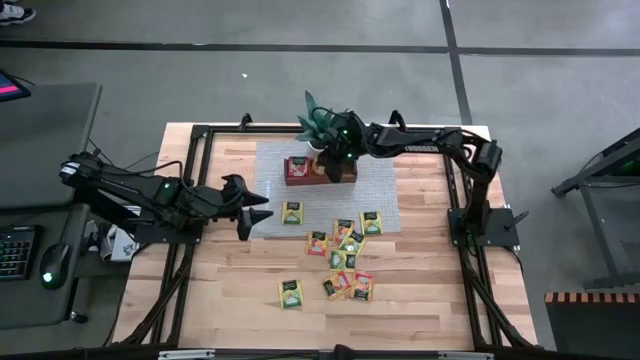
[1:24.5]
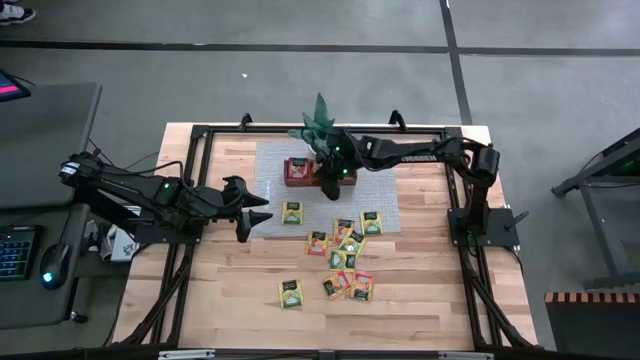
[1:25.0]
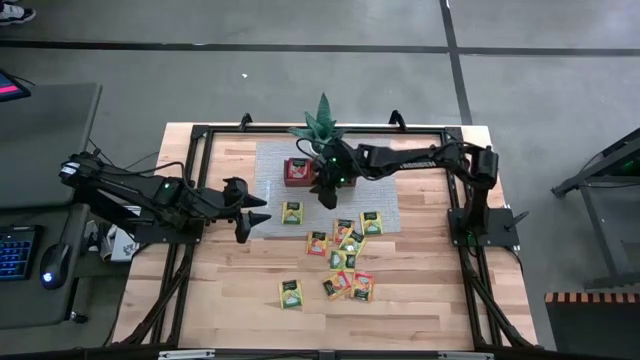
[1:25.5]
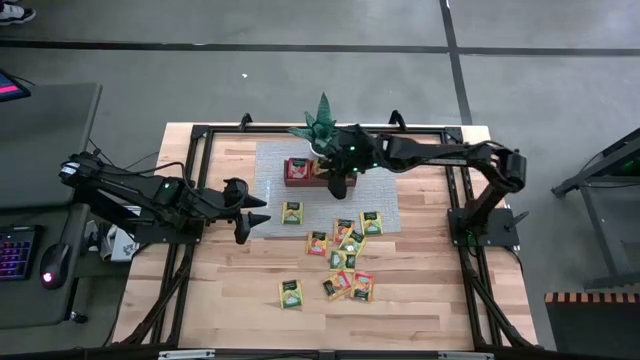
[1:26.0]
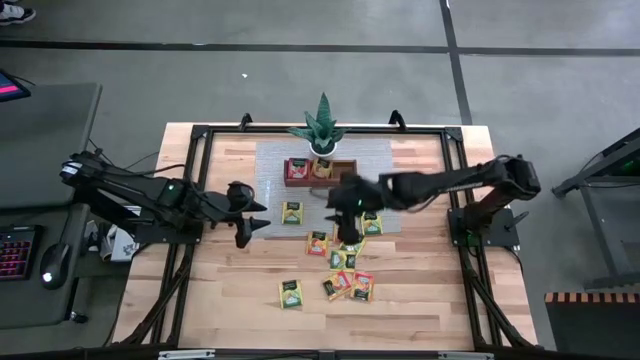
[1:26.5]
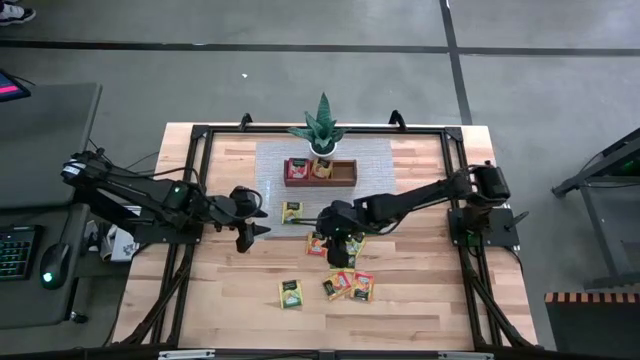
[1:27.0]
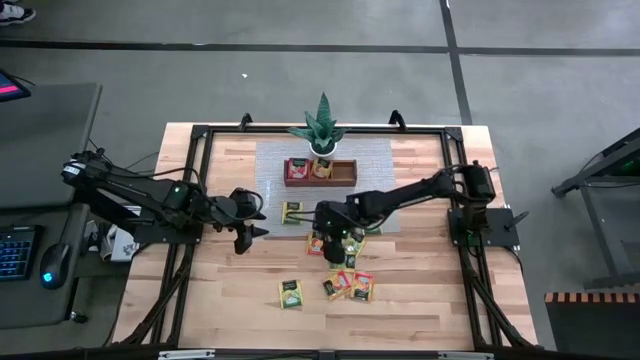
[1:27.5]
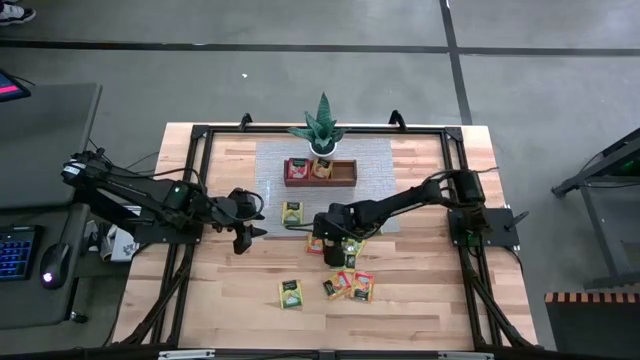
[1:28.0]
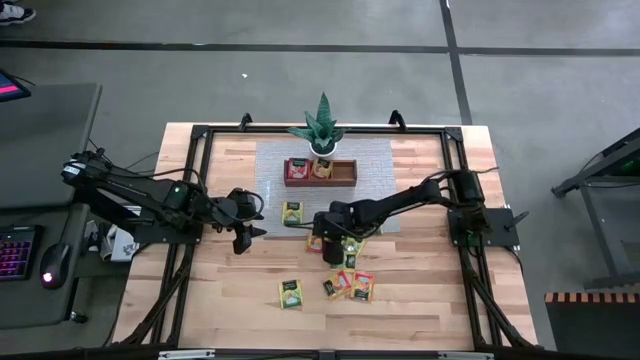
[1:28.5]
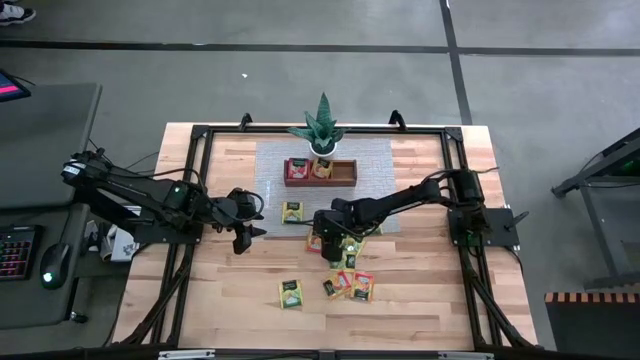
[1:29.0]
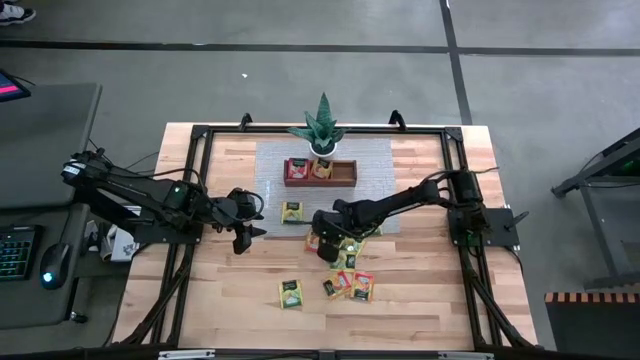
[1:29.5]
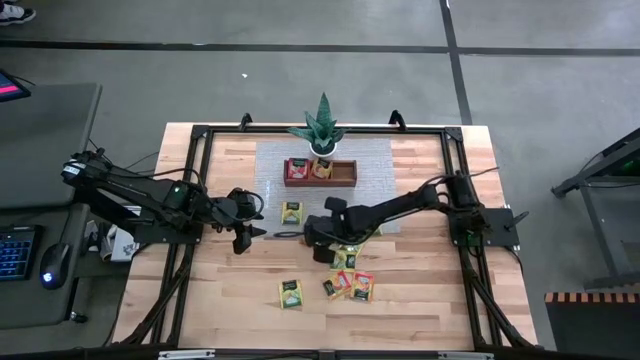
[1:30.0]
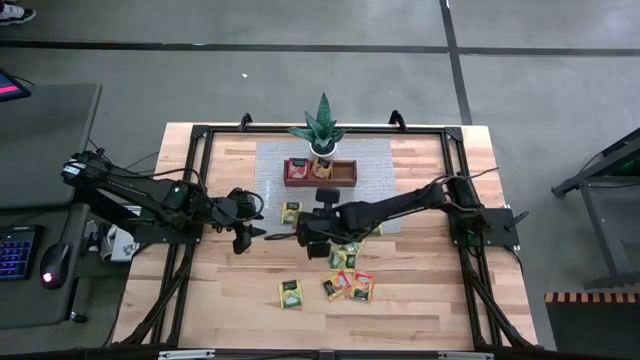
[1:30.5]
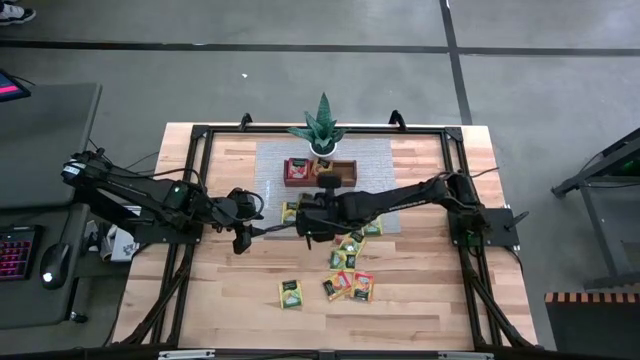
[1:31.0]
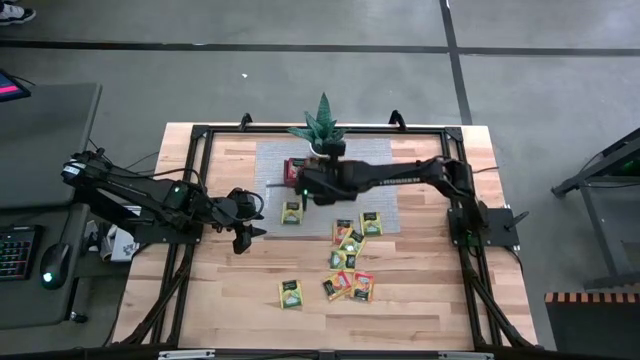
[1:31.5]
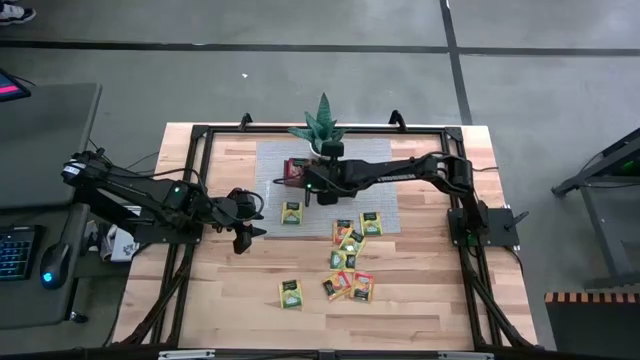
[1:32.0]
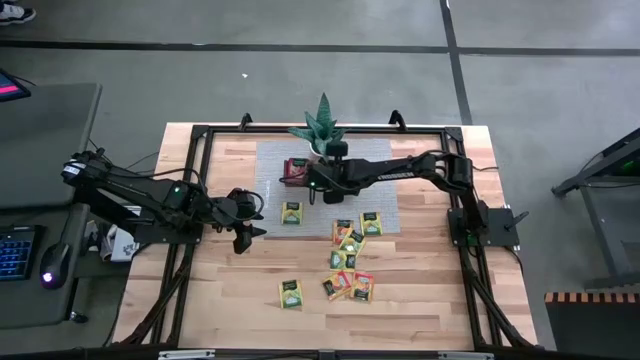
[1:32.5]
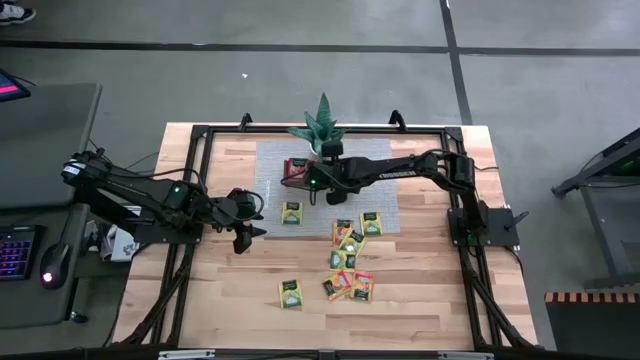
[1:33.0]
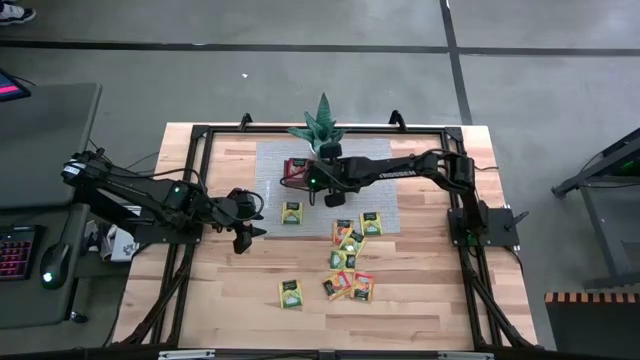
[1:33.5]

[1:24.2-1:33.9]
Task: Pick & Place Tea
Put the orange tea bag into the middle section of the wooden organizer

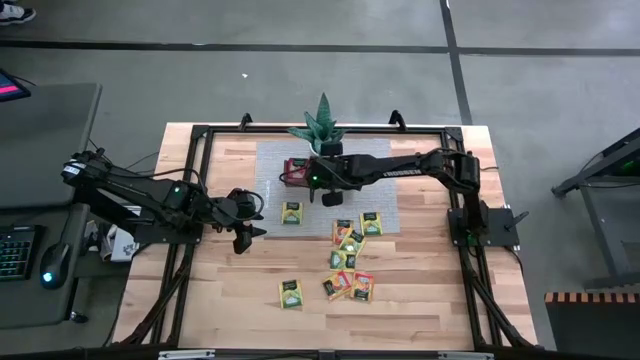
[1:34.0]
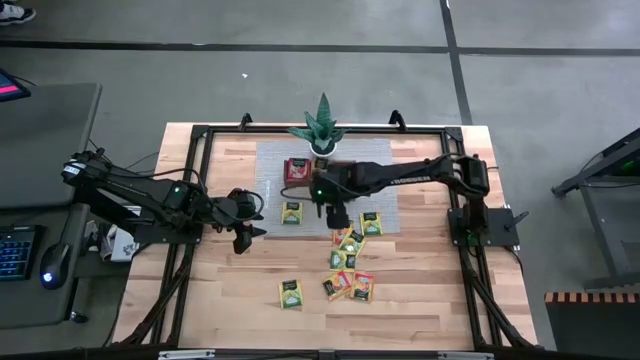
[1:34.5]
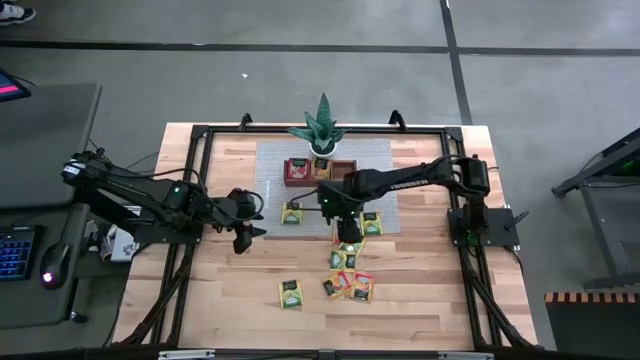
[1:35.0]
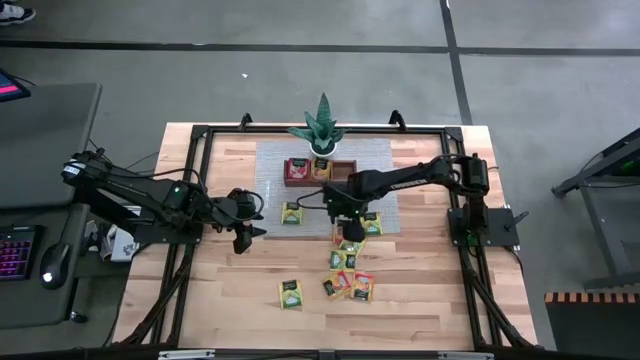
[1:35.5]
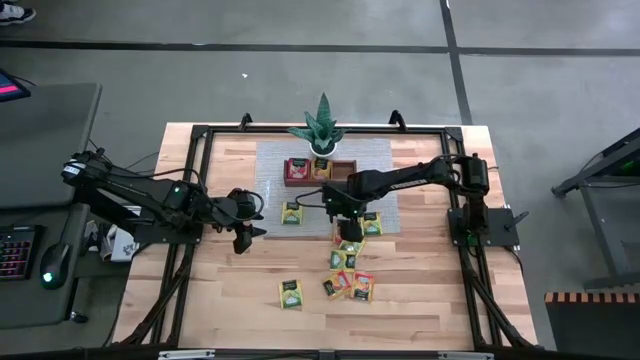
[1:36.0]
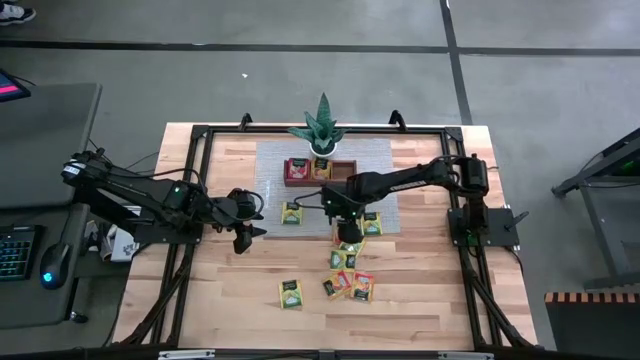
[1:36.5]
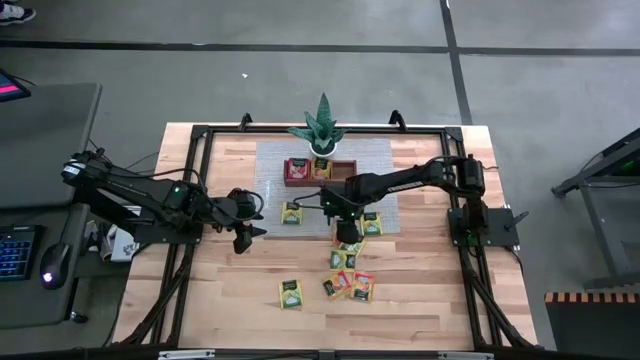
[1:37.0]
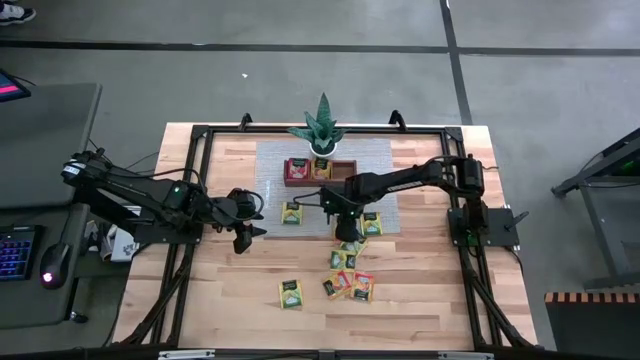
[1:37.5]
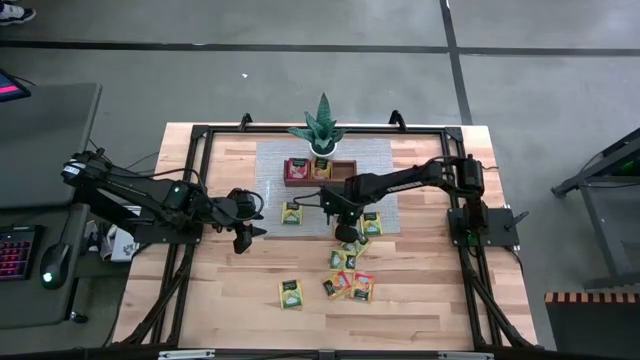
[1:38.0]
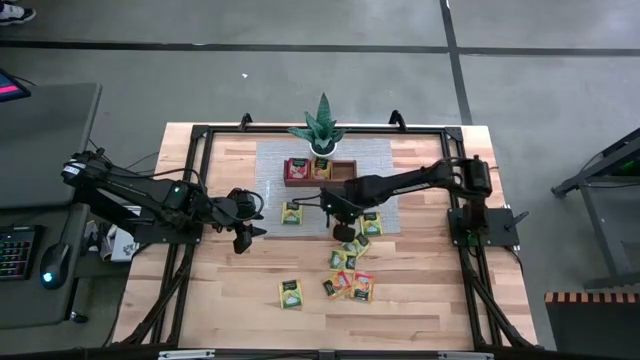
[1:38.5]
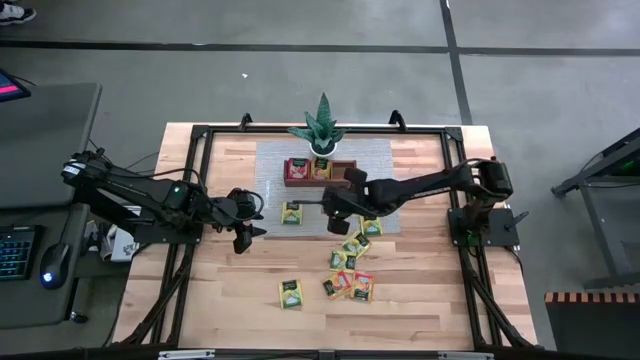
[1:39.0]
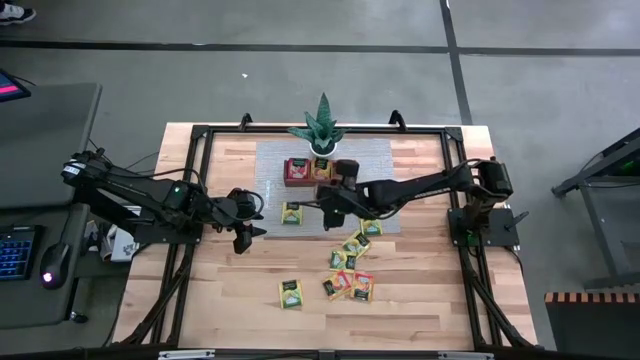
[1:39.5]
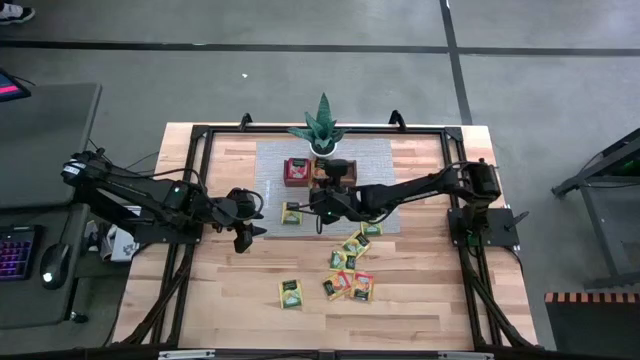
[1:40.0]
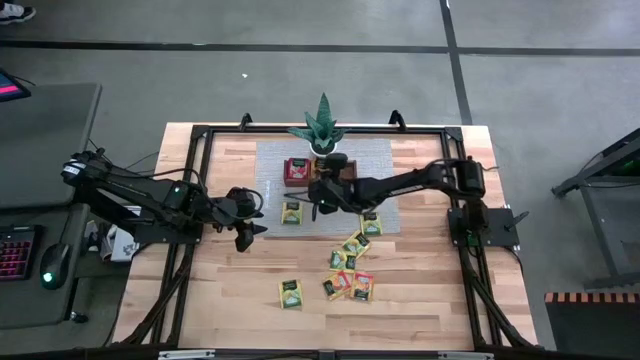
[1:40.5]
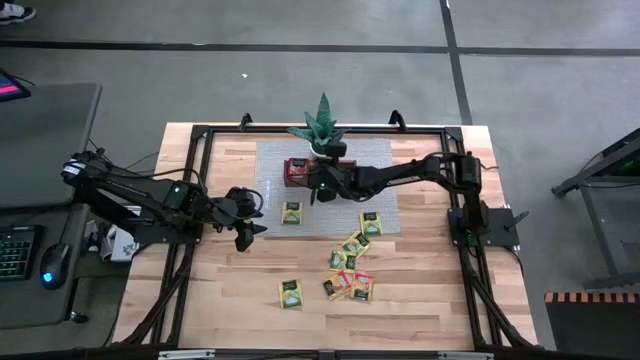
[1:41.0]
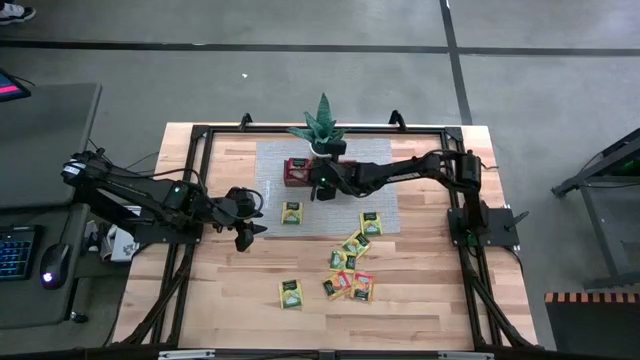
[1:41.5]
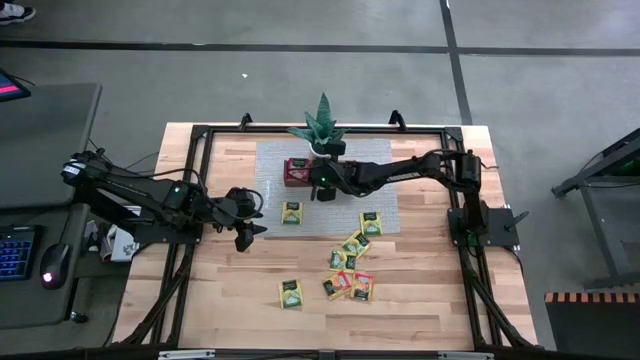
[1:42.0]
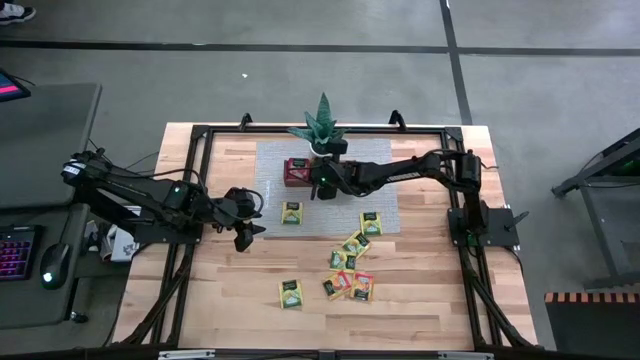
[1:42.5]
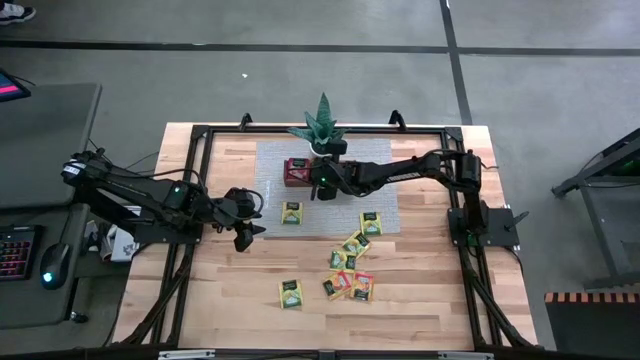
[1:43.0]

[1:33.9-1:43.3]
Put the orange tea bag into the middle section of the wooden organizer

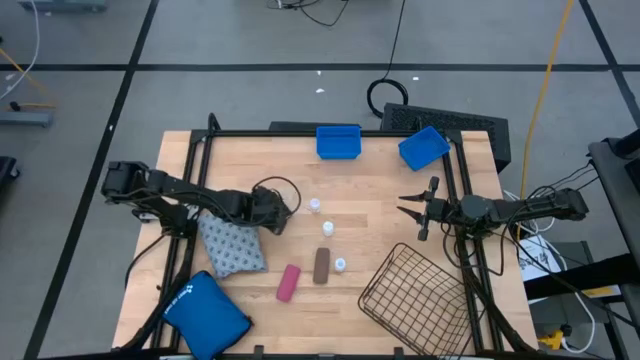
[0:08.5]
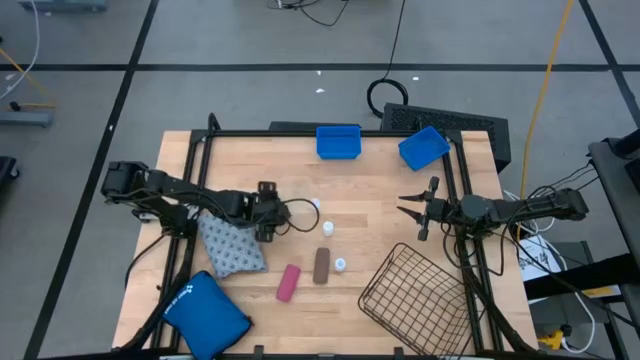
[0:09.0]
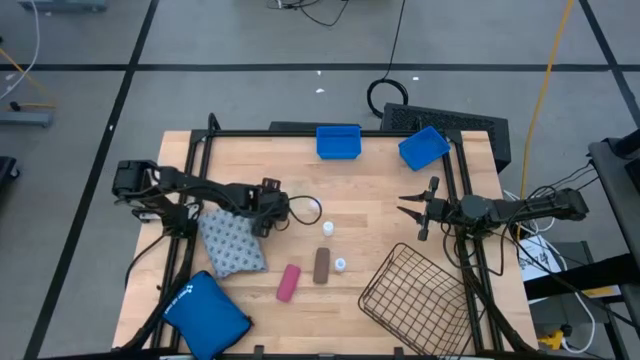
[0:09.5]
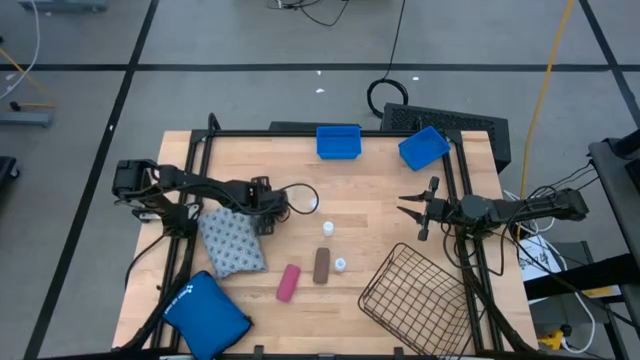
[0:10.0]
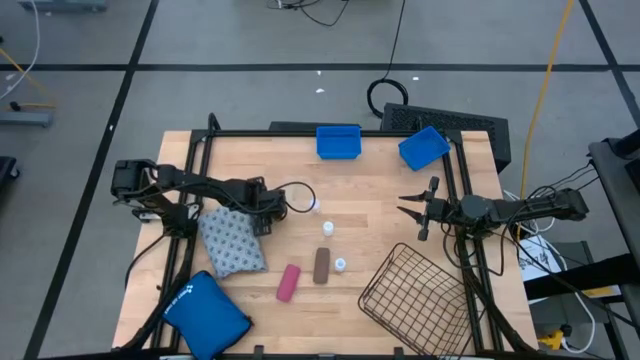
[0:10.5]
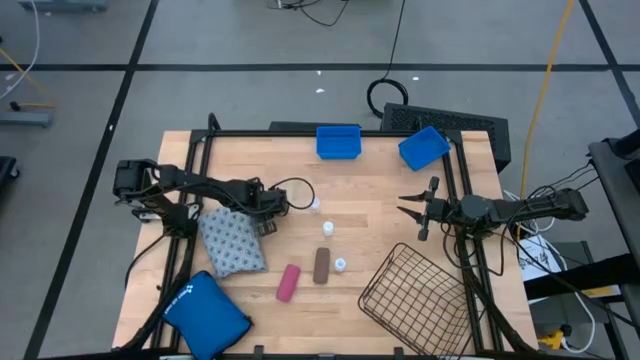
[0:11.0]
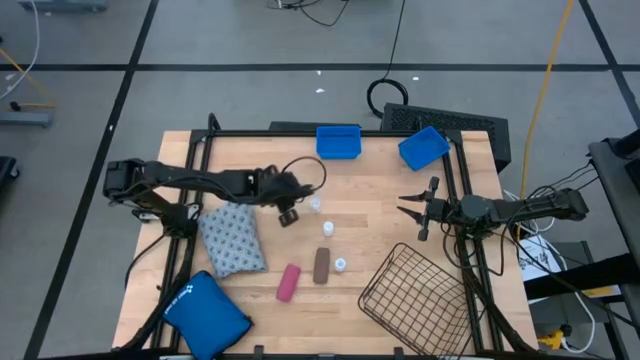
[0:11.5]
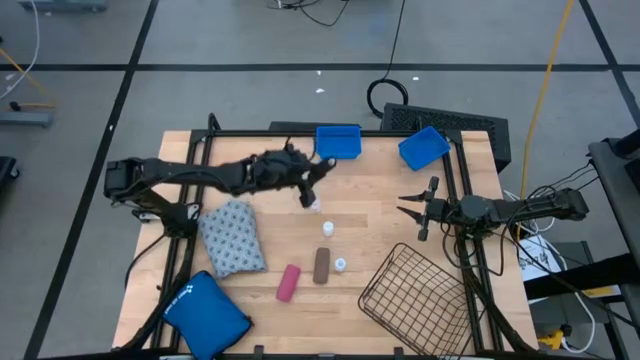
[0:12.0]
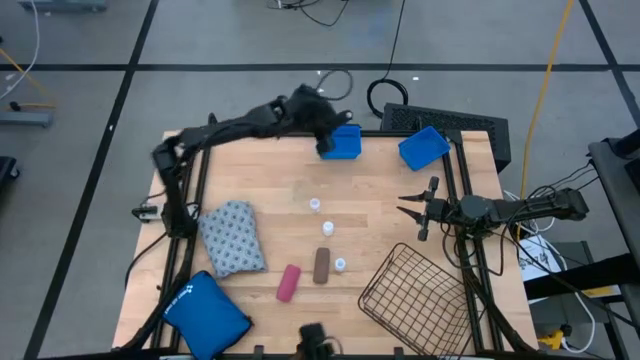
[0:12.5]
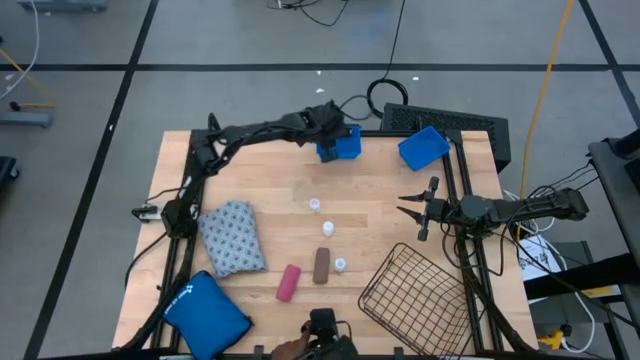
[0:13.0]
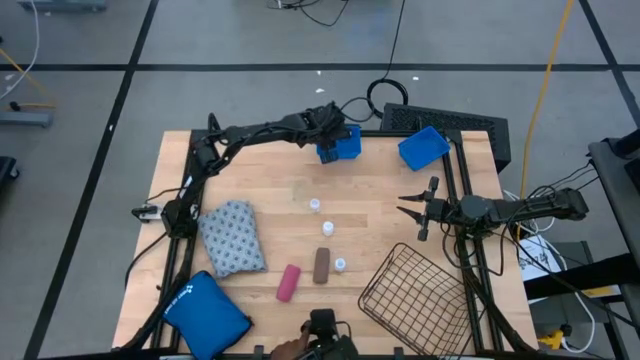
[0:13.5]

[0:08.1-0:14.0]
Task: Pick & Place Medicine items
Put the black rolled gauze into the left blue bin
